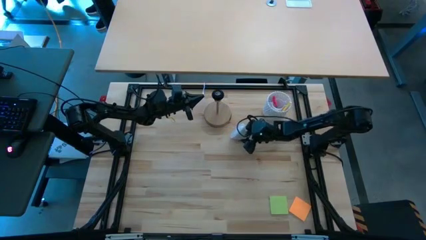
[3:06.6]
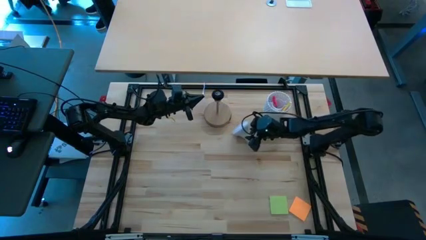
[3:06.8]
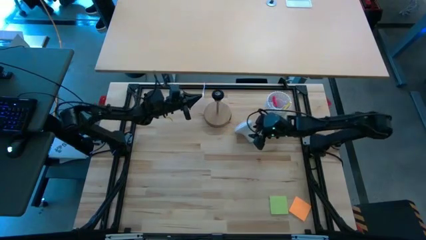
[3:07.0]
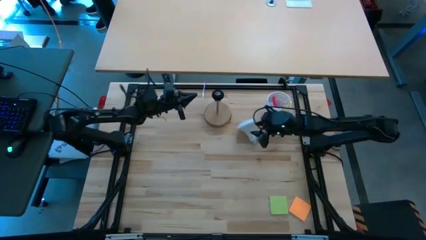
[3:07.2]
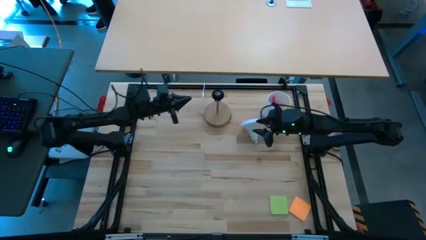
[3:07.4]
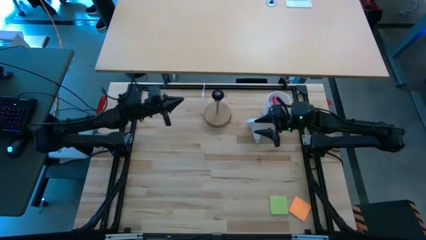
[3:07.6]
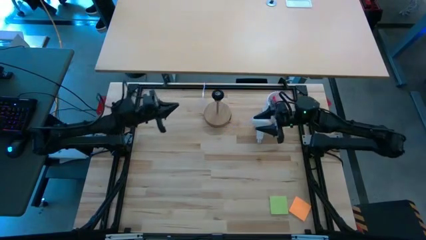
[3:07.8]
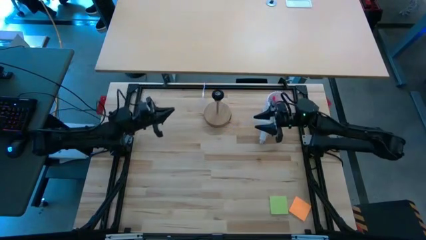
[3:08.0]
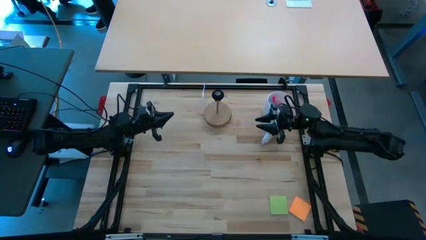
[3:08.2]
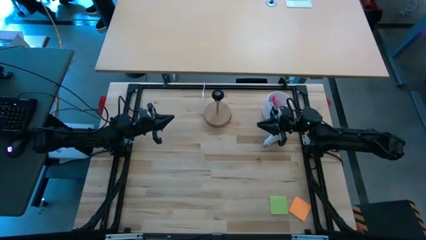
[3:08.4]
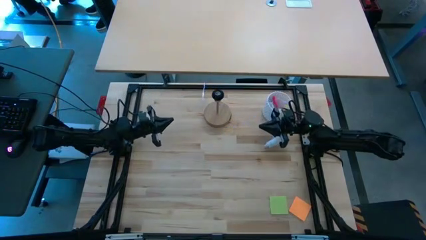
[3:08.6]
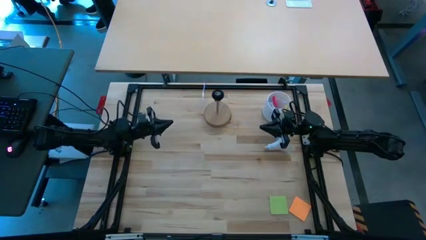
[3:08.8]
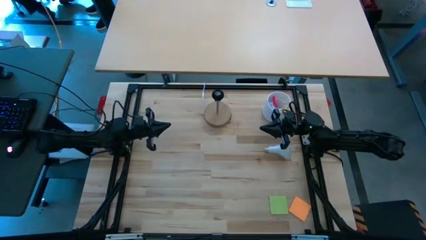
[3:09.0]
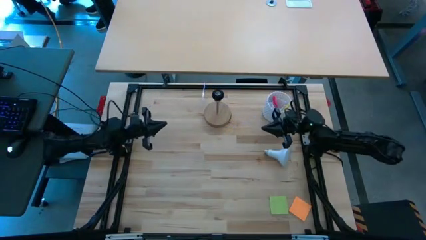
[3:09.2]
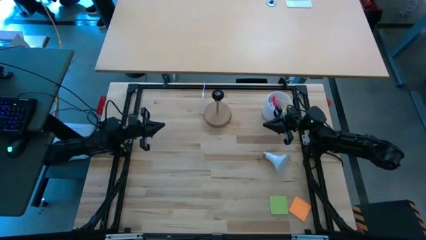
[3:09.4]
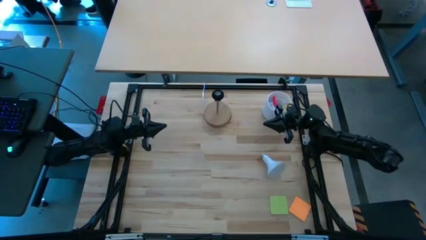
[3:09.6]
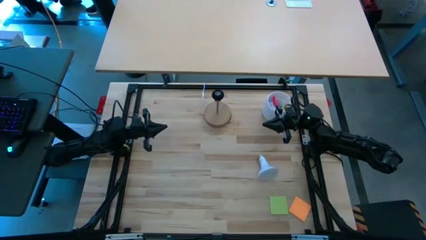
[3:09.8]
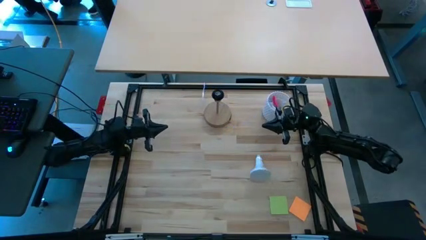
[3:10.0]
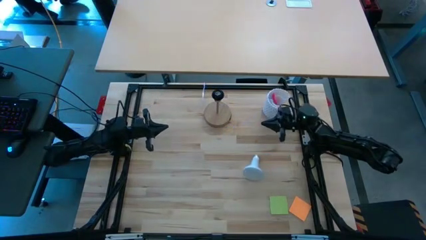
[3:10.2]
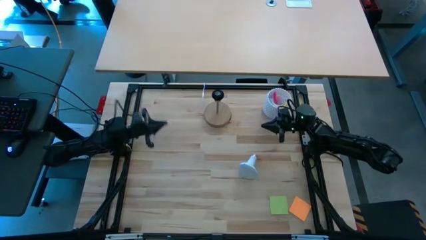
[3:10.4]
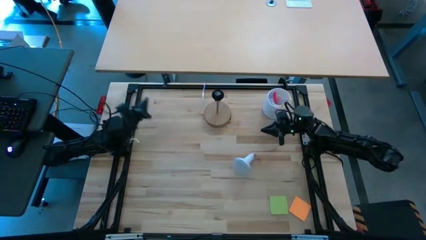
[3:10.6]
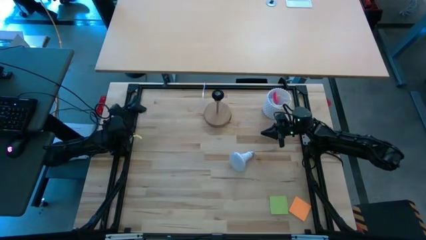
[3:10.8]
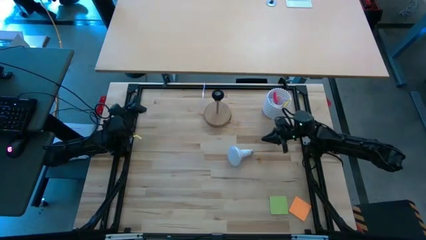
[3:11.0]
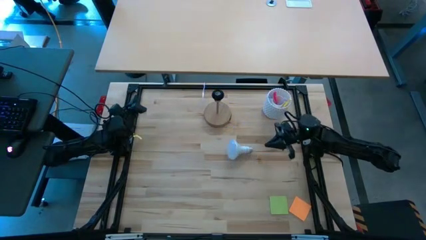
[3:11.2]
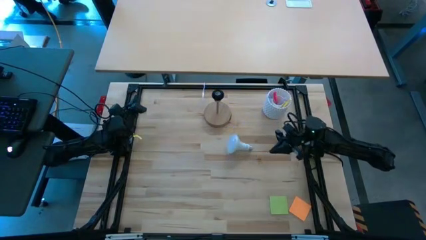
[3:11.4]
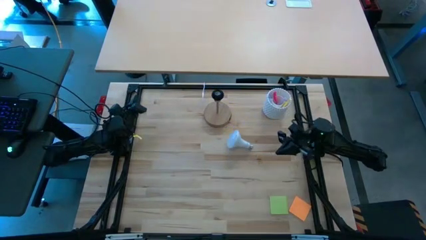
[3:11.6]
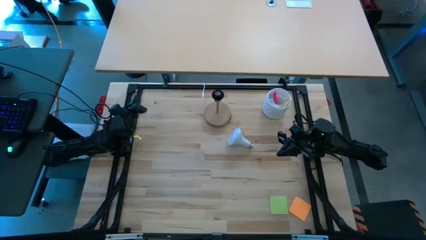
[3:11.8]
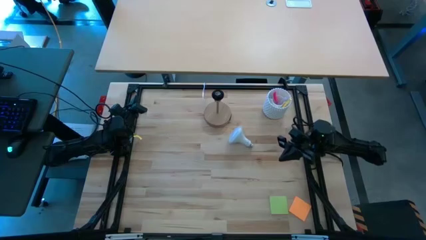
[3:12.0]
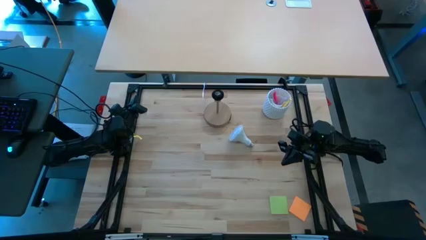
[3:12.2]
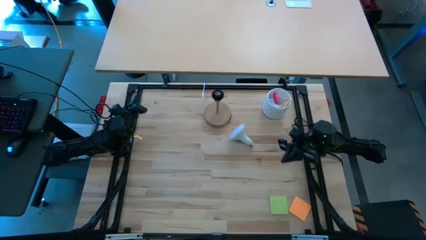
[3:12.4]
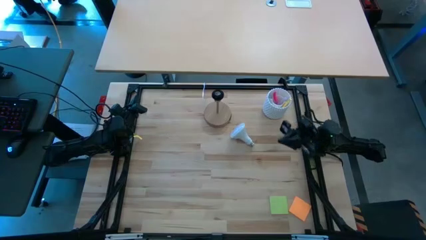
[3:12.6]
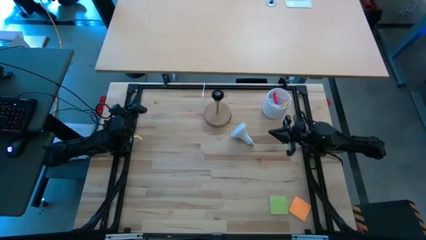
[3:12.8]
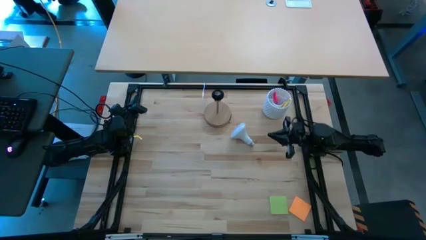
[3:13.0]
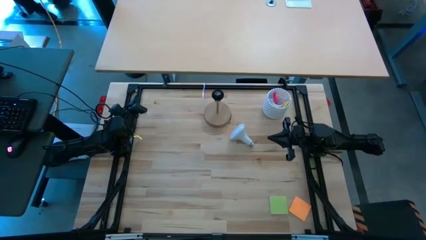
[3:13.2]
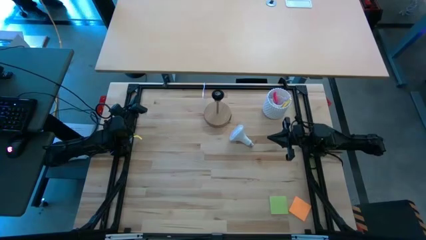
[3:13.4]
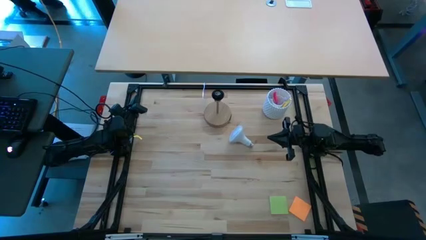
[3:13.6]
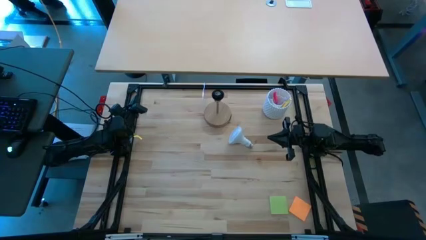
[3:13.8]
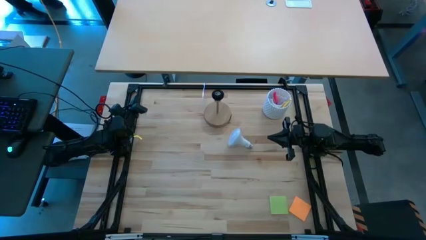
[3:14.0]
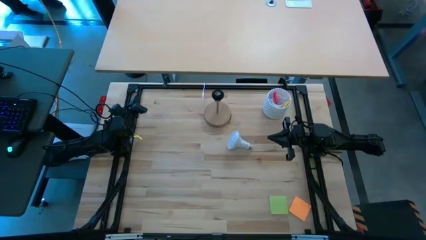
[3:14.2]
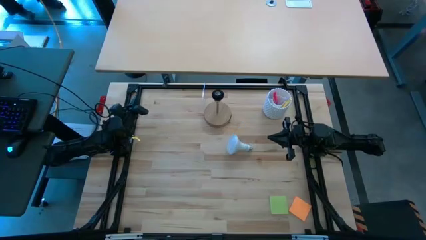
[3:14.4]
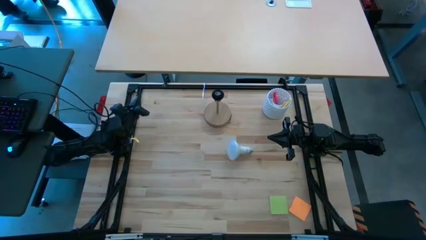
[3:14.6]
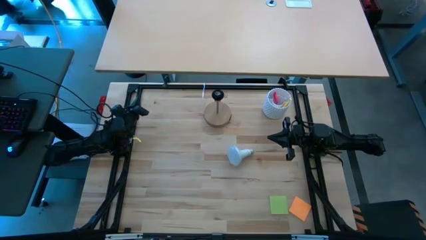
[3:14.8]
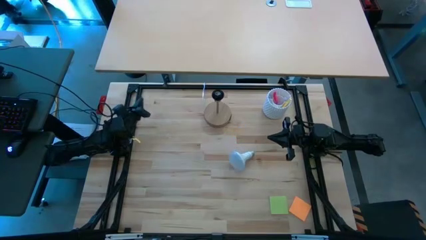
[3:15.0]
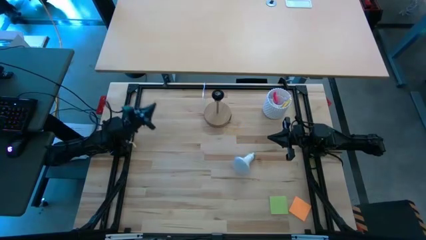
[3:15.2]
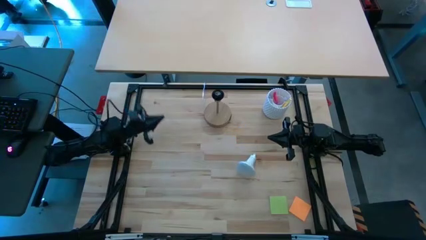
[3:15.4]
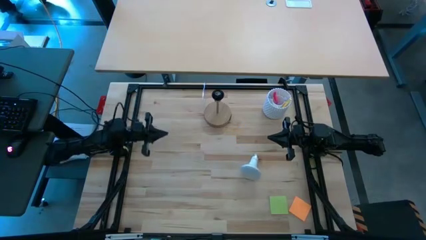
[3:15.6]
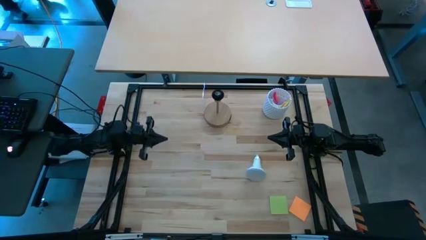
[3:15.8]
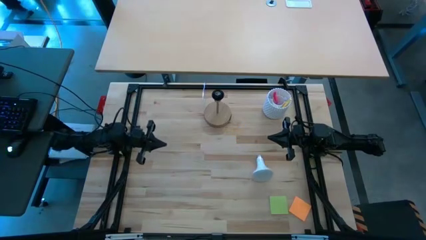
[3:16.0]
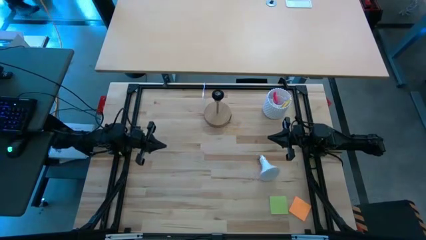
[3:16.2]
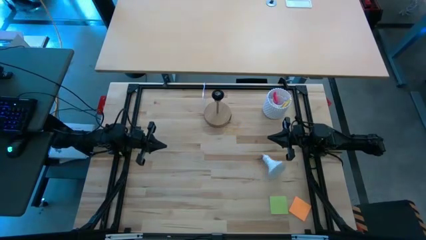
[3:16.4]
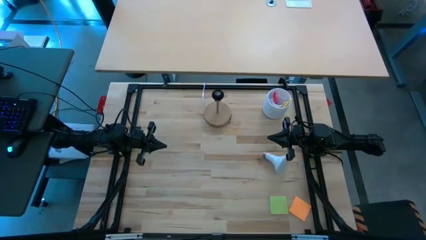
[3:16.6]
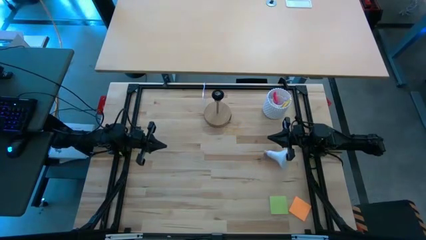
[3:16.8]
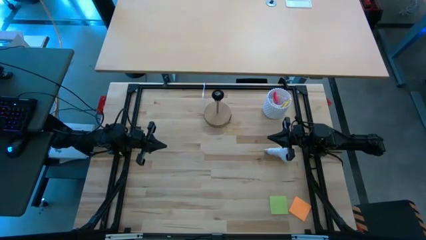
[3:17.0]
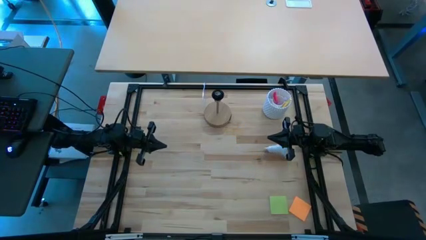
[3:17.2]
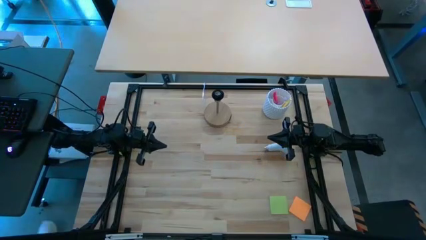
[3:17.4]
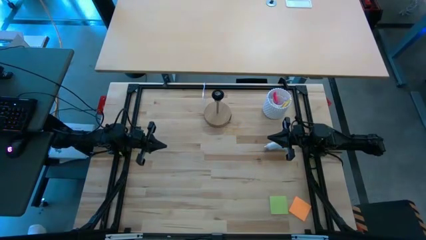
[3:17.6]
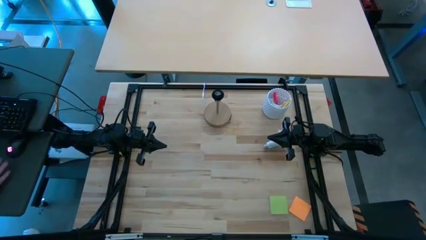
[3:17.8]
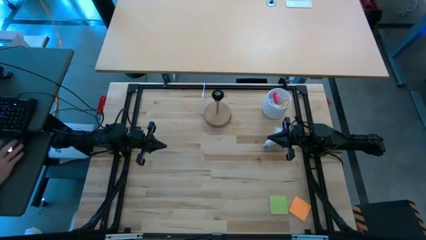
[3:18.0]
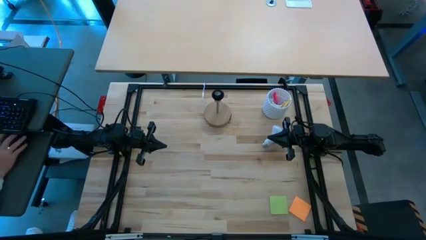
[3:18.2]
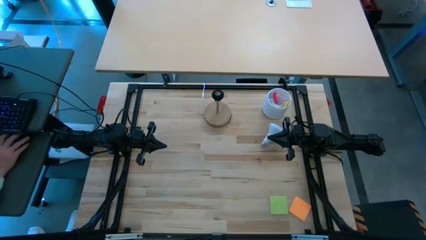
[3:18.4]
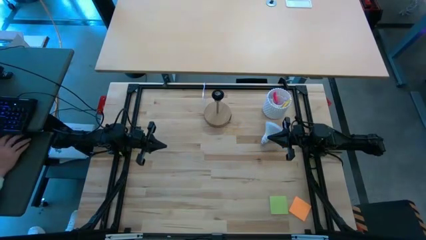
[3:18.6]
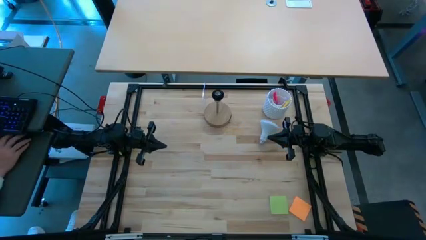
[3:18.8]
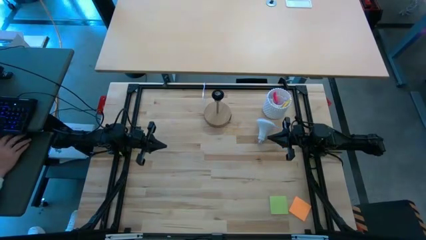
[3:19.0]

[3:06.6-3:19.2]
Task: Screw lightbulb
Return to Home Position

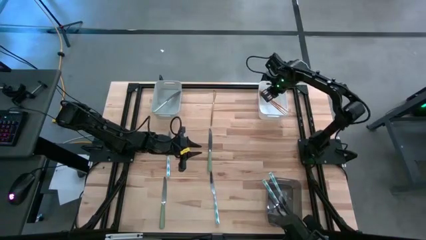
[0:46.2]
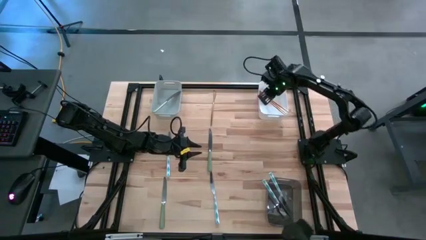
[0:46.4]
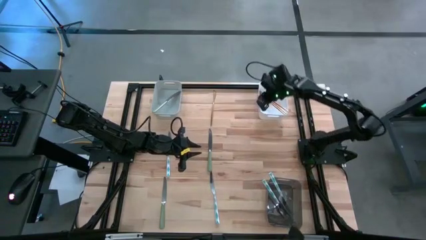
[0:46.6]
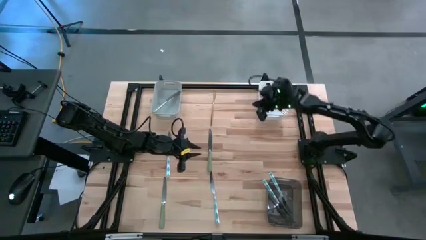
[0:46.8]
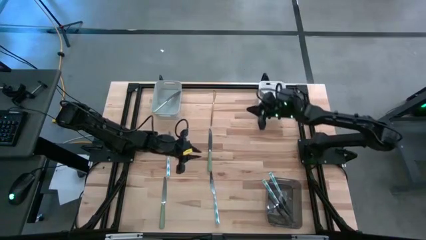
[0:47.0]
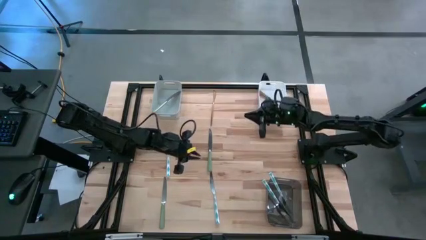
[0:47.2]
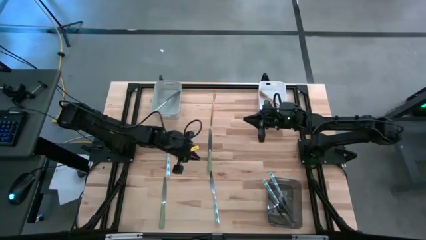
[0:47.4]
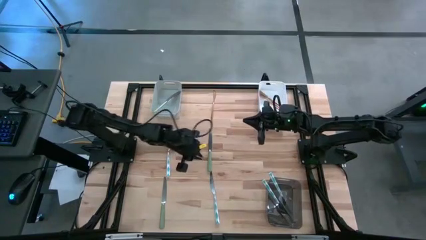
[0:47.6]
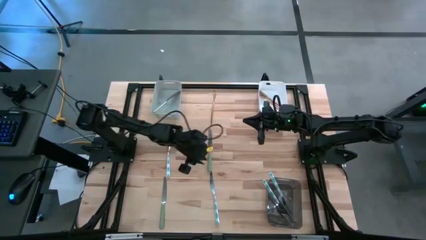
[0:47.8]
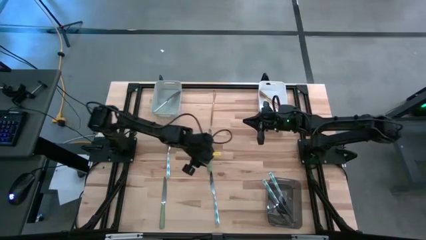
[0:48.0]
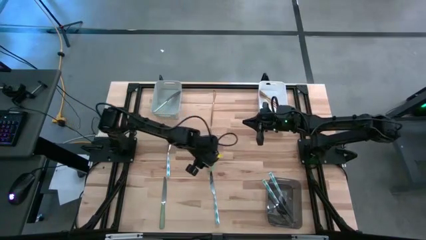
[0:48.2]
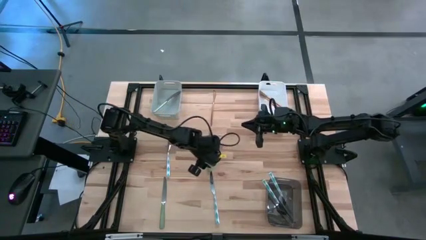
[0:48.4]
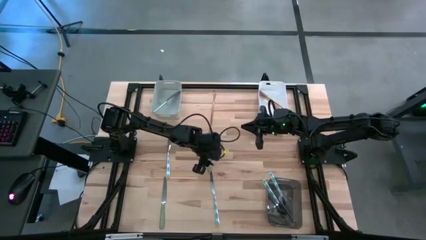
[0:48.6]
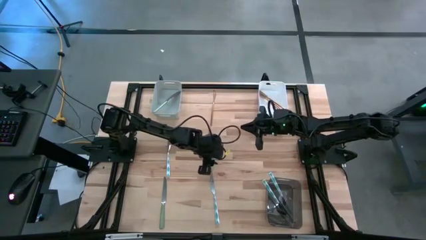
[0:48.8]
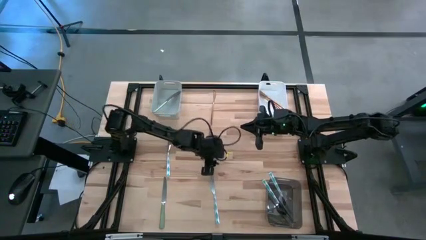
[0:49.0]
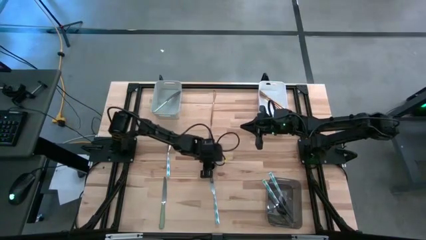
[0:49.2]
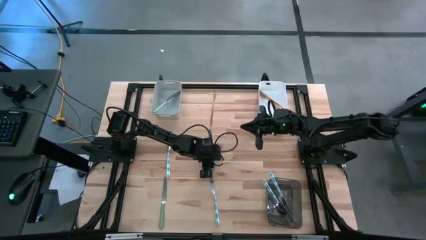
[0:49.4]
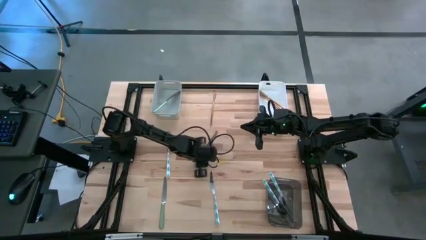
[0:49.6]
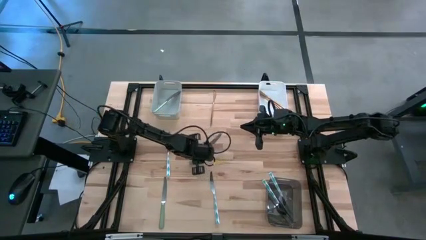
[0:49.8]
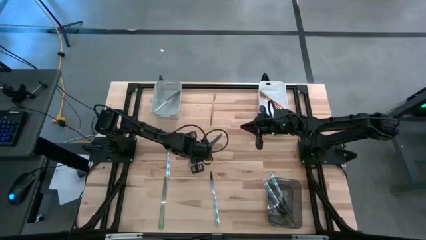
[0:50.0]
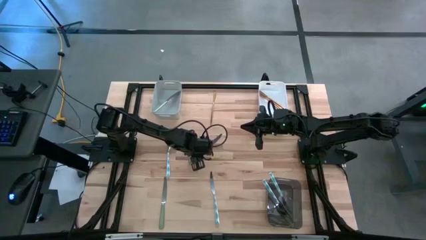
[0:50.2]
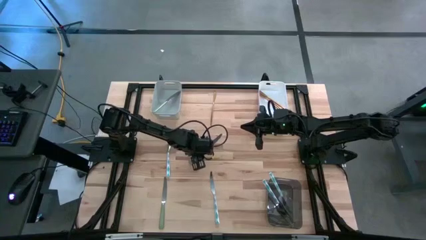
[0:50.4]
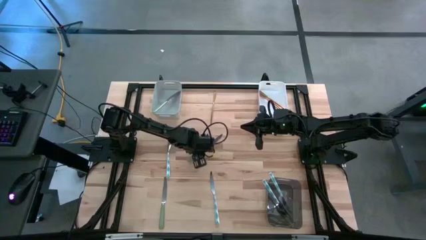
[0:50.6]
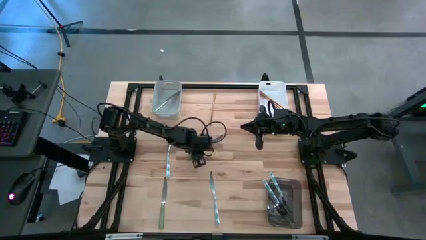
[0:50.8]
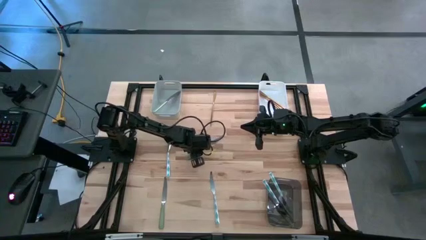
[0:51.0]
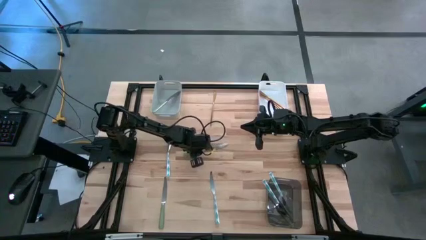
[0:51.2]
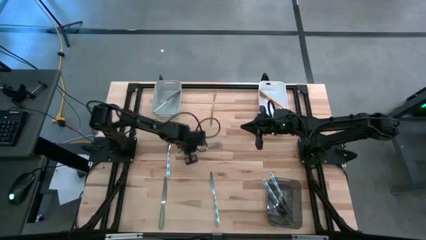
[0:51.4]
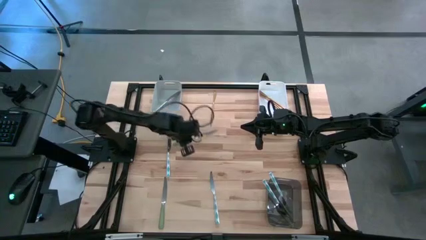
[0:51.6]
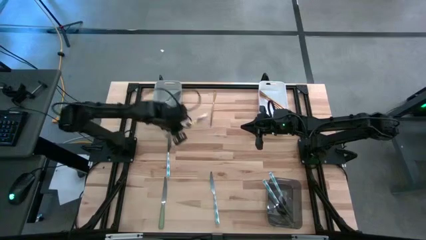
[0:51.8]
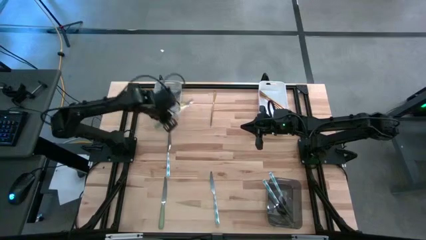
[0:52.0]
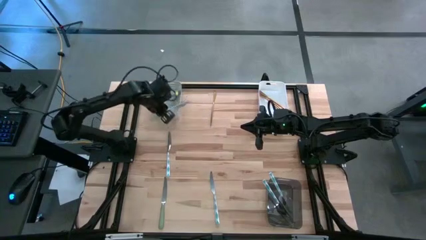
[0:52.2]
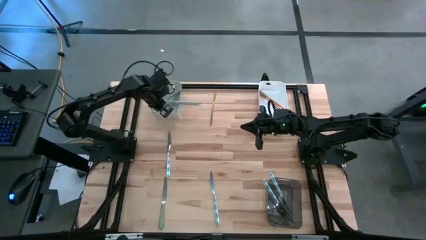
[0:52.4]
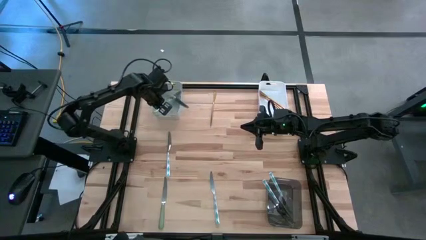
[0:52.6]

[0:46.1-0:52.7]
Task: Sort silverware by color (type)
Put the top green knife into the gray bin
